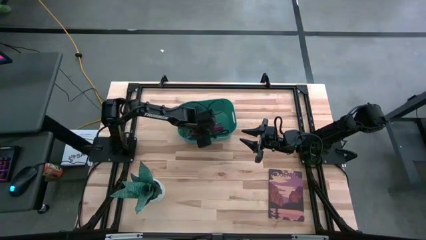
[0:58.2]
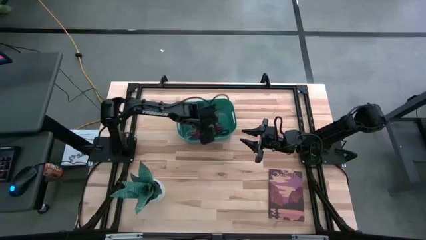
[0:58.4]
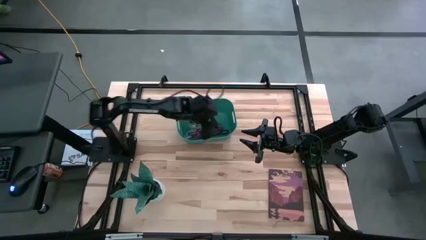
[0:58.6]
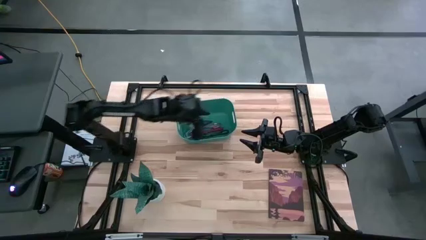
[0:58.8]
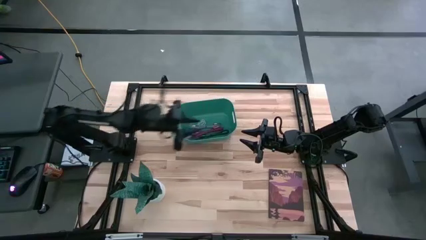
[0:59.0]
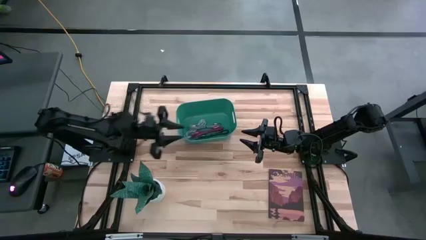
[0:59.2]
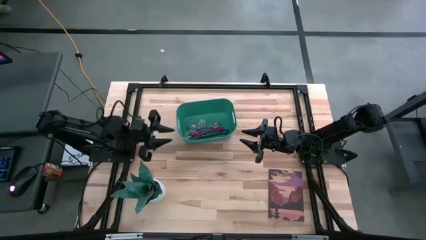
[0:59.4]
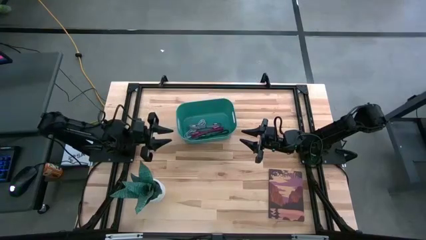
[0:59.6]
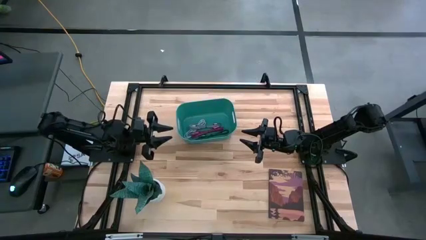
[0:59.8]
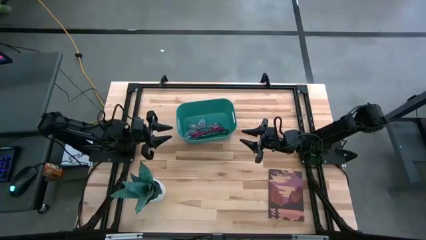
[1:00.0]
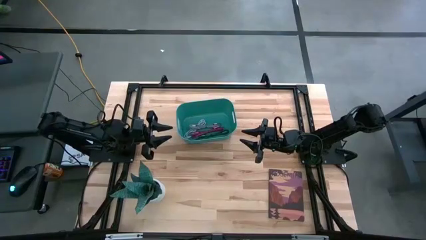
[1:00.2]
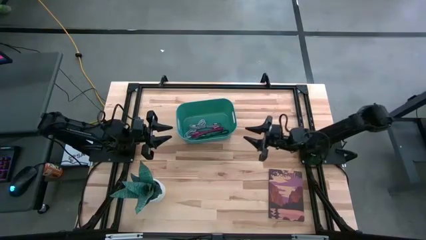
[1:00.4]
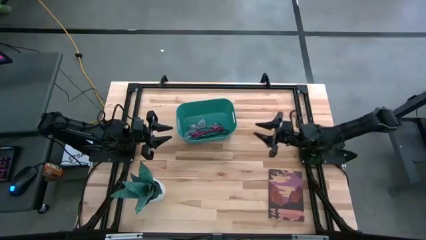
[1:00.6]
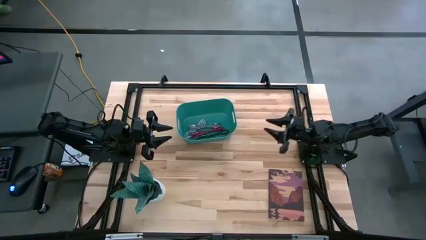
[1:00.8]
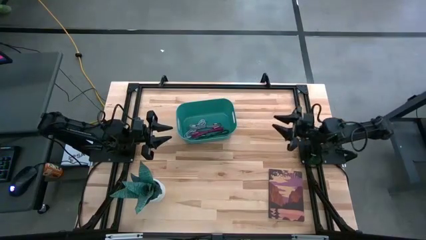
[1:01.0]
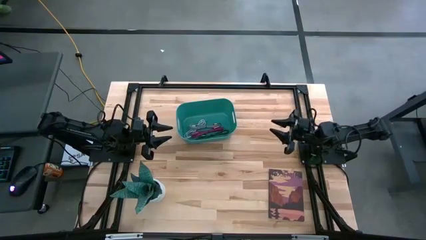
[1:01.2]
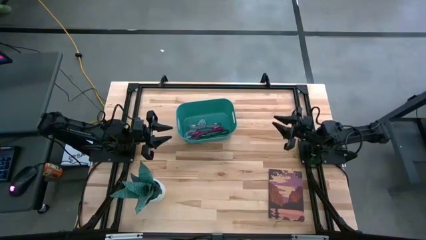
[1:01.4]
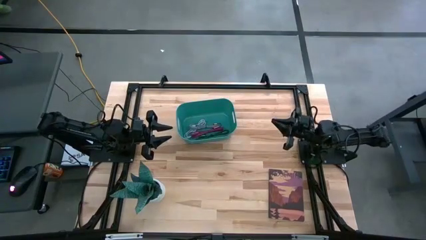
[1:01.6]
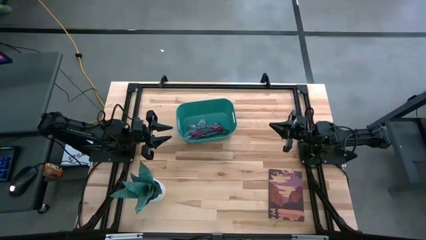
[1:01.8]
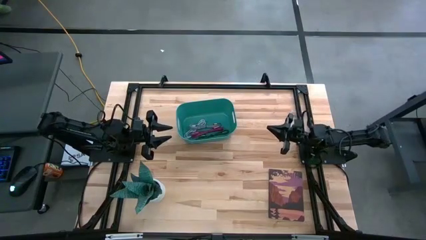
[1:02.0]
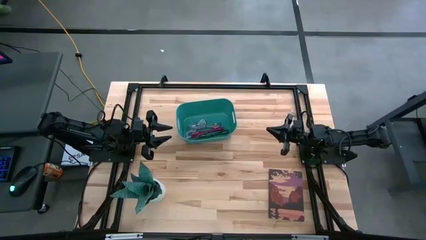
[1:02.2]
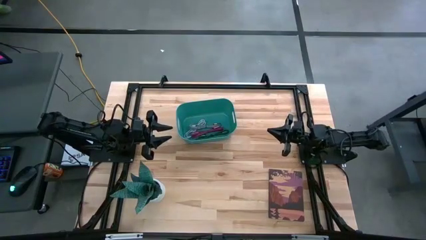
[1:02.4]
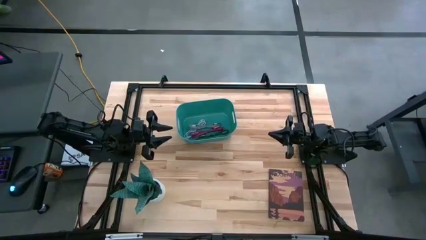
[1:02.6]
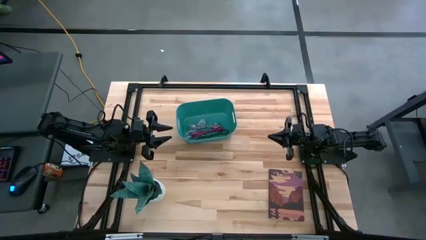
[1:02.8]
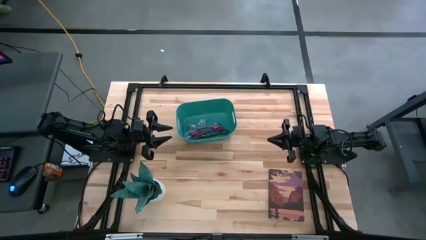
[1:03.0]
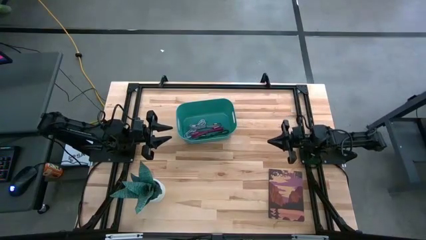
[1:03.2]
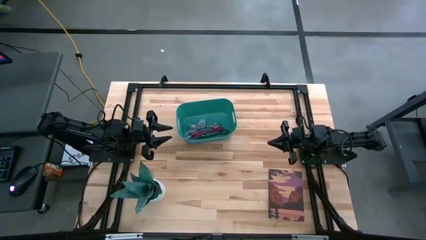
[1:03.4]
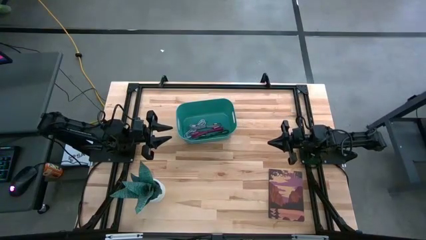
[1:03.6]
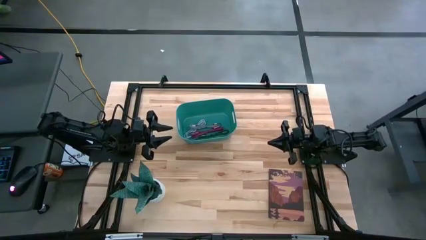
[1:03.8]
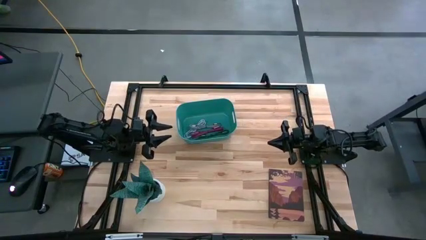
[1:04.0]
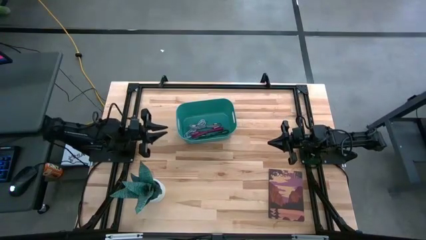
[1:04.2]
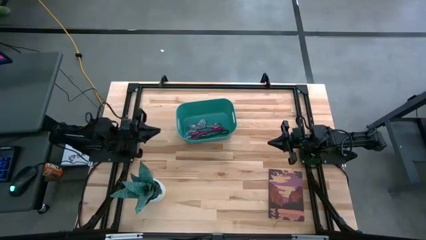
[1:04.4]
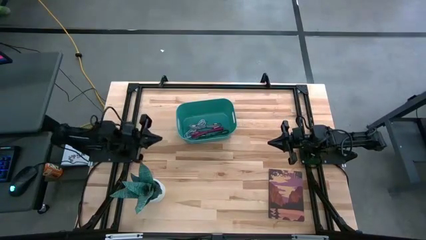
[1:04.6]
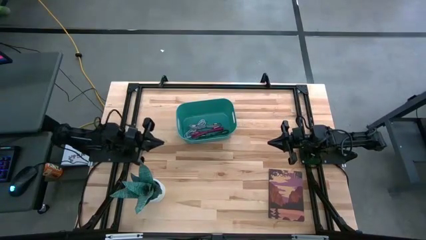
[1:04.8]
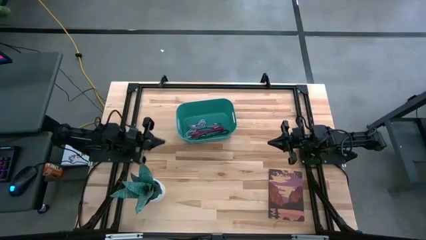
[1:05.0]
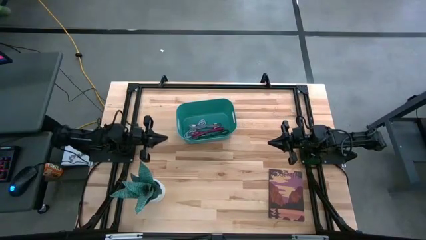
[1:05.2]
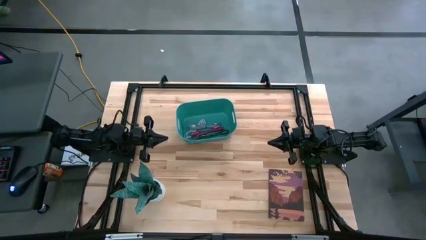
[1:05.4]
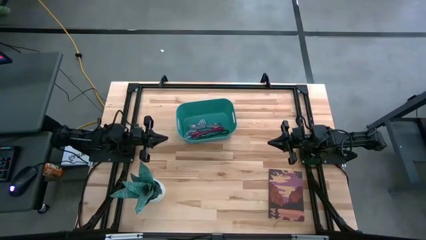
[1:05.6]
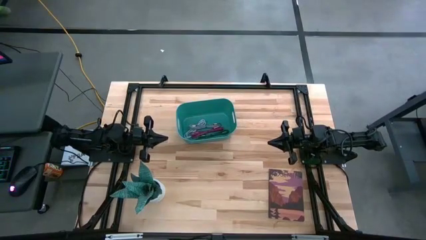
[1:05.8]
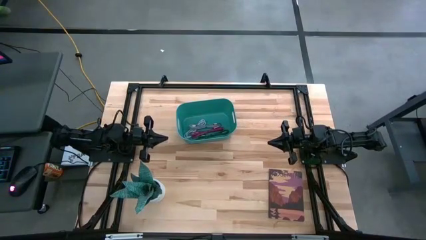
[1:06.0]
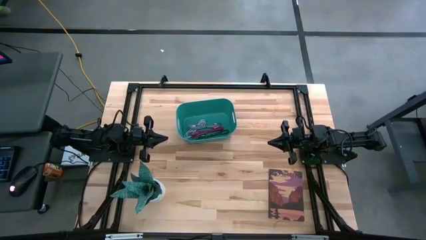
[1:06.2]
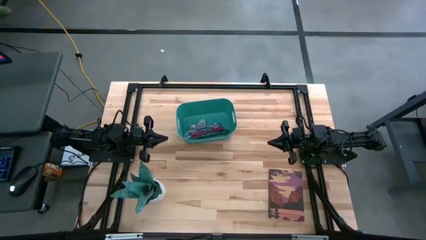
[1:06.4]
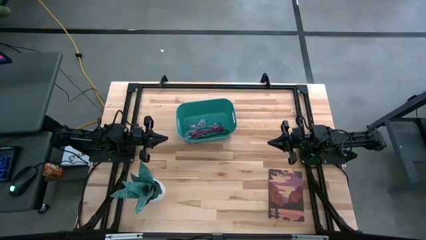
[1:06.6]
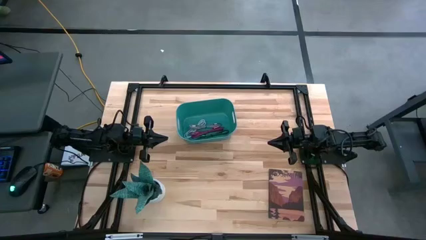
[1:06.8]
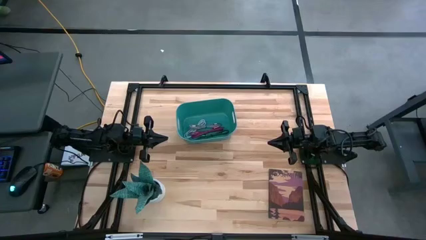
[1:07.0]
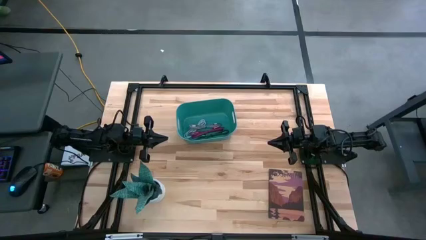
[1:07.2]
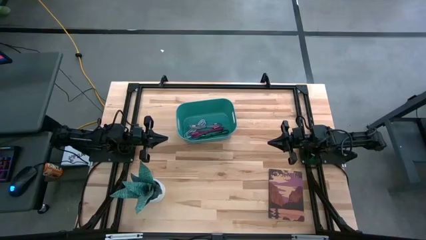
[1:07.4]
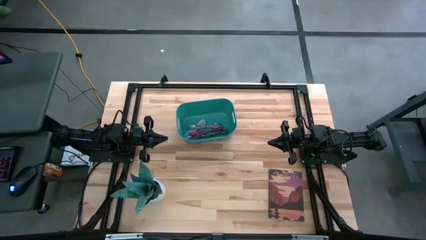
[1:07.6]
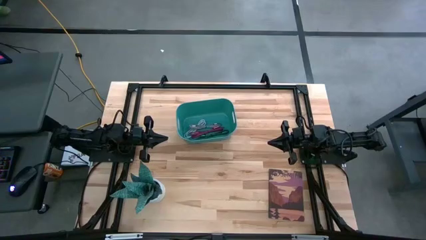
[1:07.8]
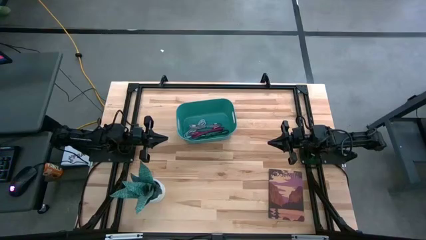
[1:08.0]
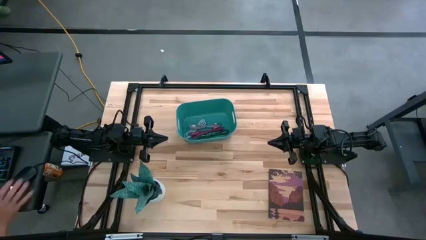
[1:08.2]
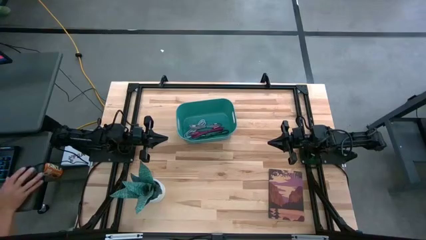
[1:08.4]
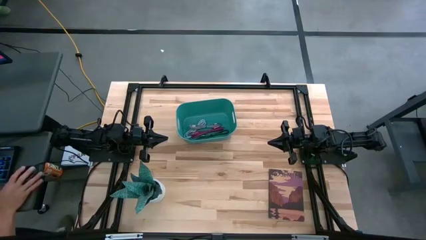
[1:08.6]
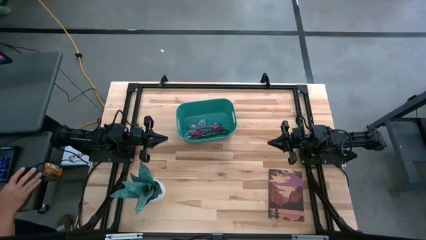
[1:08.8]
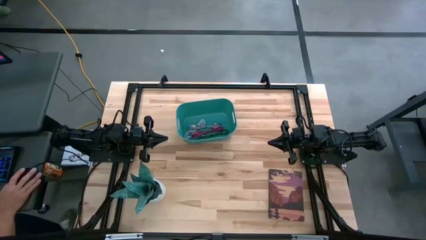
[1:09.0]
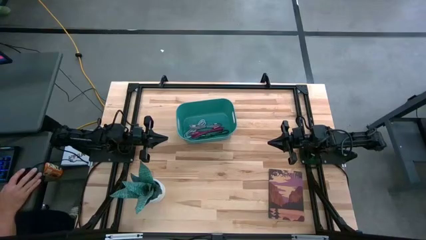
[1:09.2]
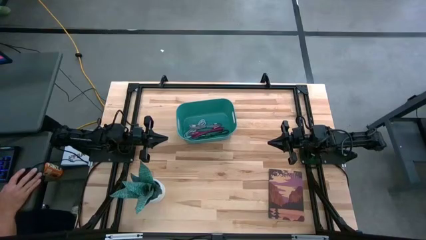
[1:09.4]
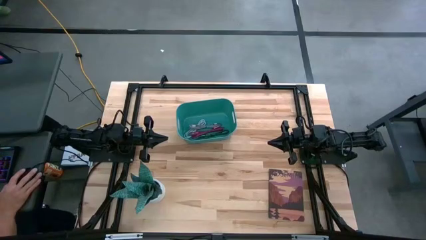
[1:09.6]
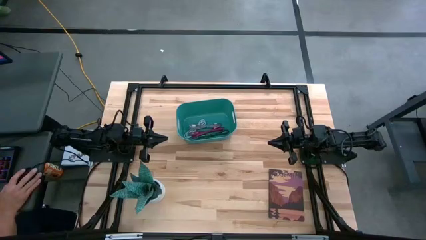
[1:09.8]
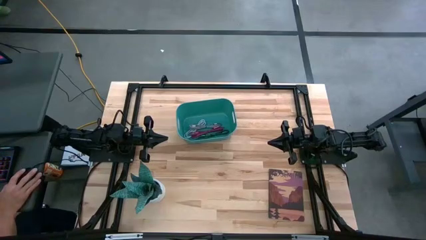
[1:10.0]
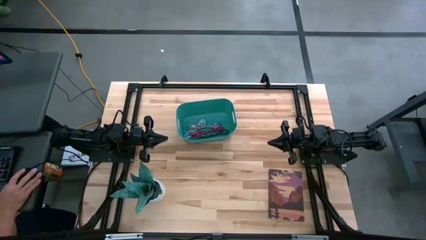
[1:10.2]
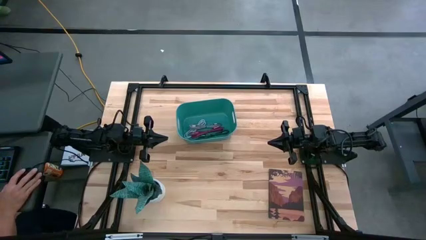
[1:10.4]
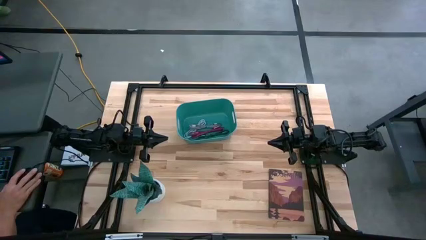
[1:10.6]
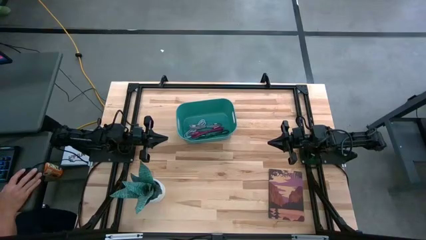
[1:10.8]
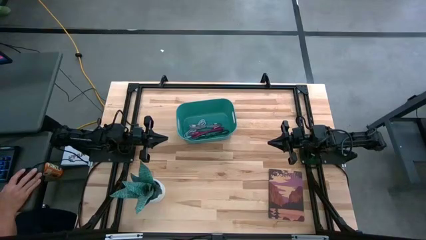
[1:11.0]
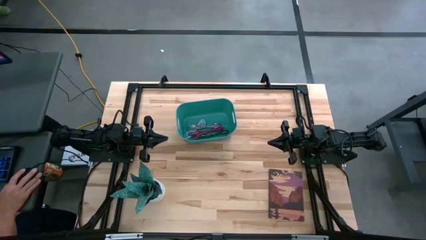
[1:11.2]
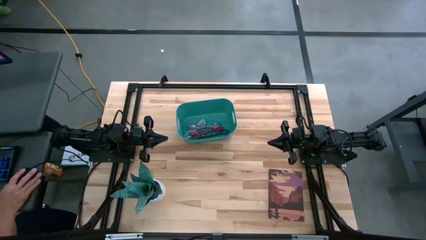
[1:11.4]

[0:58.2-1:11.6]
Task: Pick and place USB-C Cables
Return to Home Position

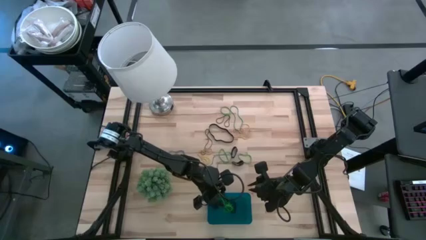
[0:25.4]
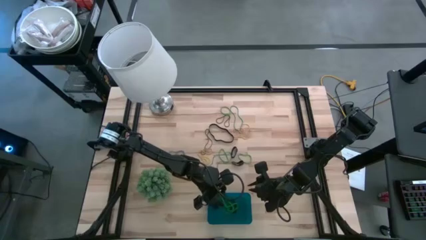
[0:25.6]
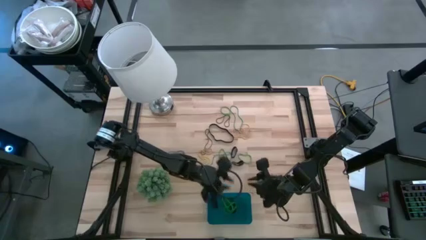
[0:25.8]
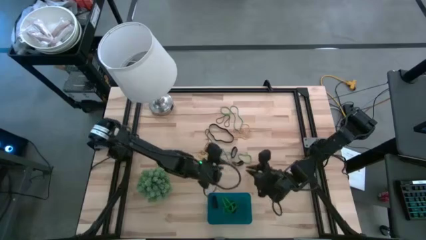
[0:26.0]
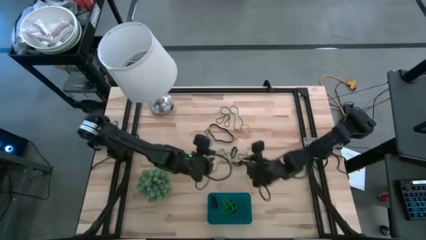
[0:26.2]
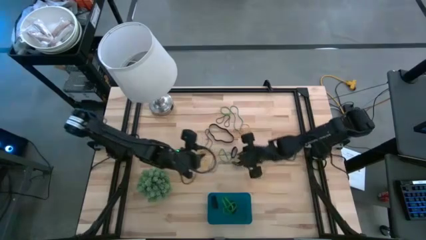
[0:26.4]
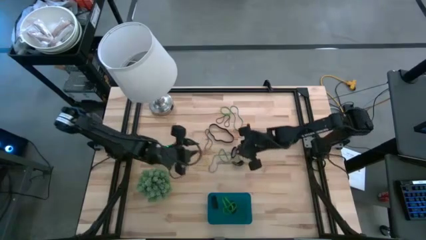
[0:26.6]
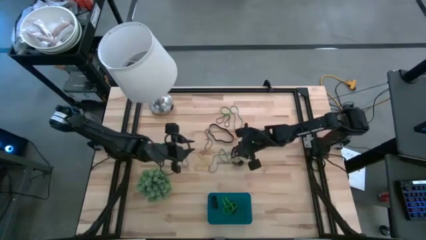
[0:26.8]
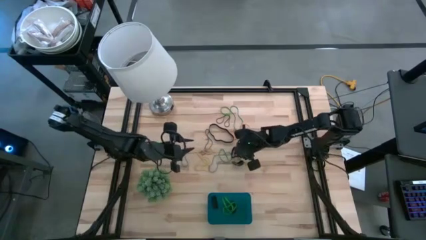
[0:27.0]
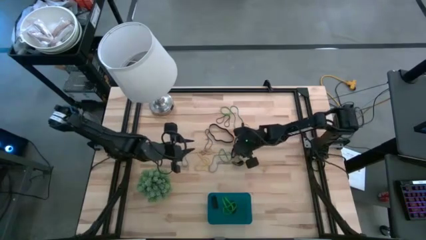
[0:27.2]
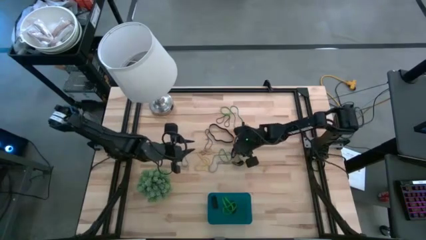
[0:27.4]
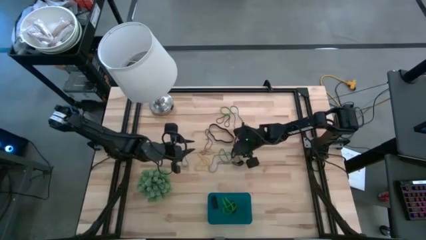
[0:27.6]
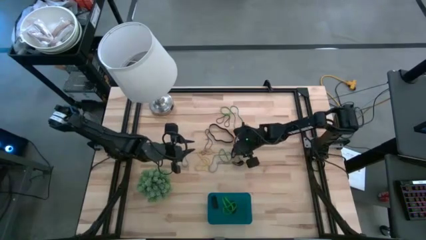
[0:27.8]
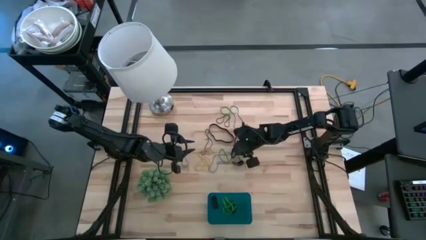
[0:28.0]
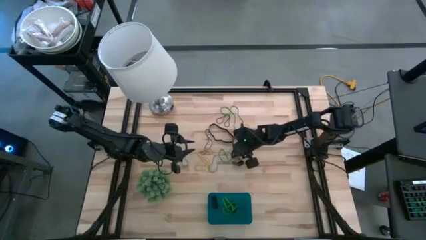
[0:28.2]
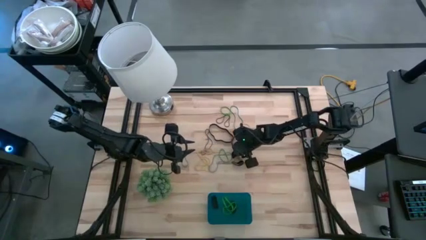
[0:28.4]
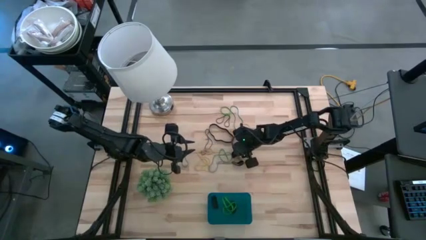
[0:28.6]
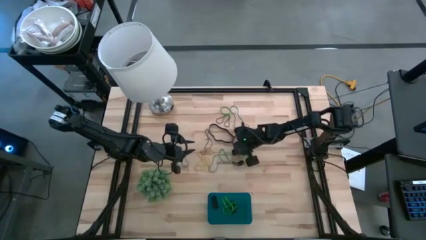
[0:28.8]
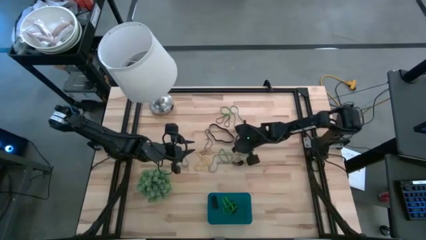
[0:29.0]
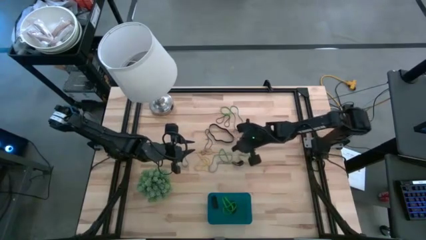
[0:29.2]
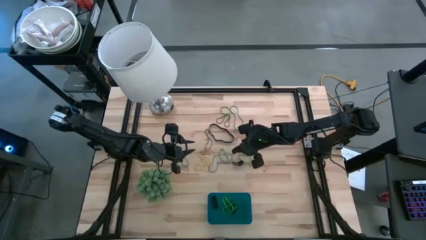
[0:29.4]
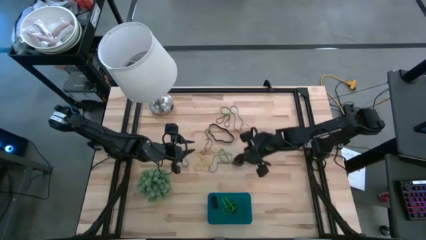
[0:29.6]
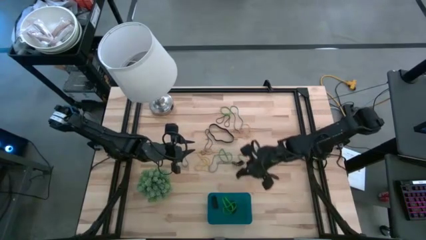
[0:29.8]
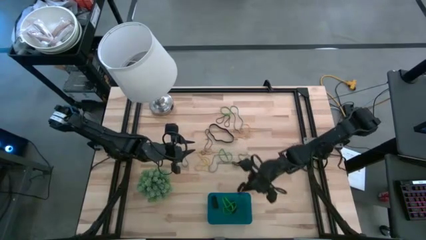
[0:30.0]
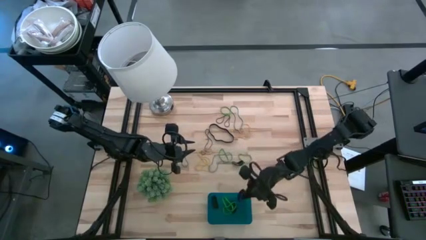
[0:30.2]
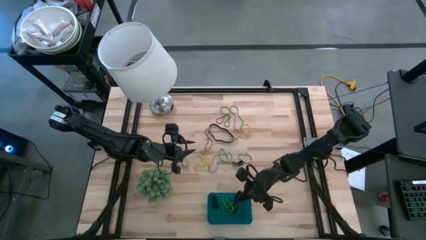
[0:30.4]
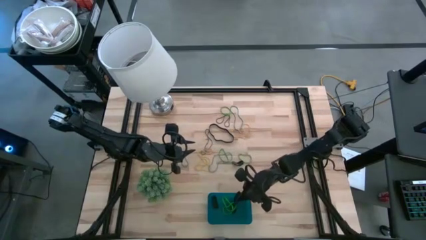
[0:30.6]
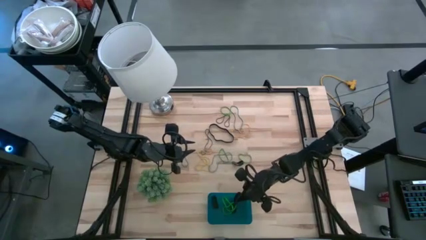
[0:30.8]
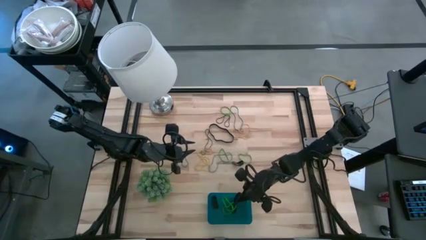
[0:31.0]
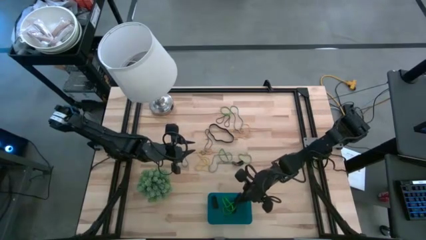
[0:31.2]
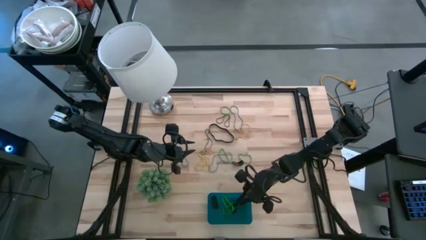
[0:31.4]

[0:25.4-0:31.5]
Task: Pick and place rubber bands into bin
Put the black rubber band into the blue bin
